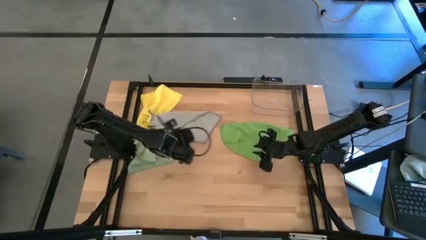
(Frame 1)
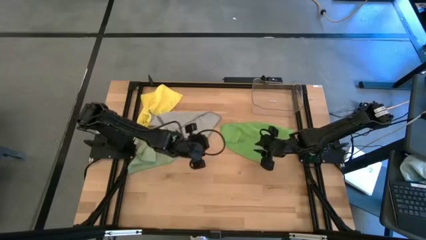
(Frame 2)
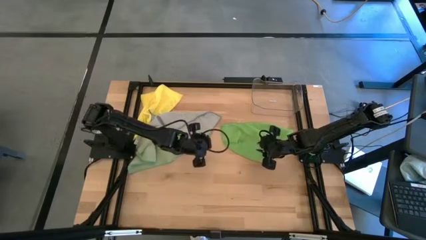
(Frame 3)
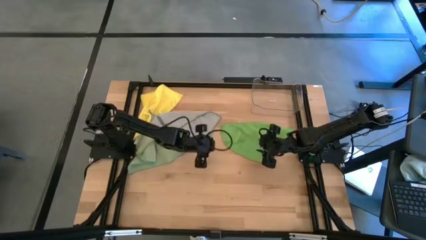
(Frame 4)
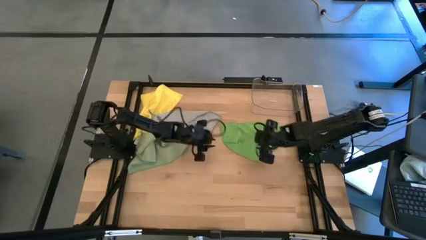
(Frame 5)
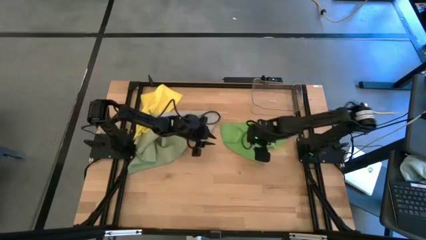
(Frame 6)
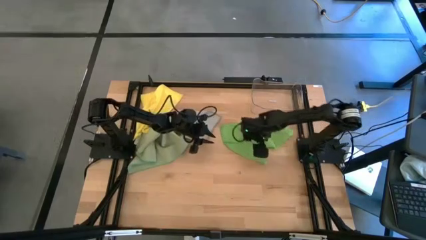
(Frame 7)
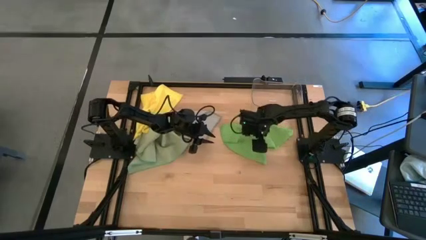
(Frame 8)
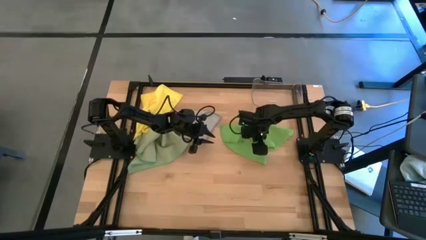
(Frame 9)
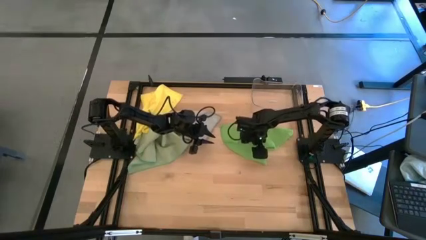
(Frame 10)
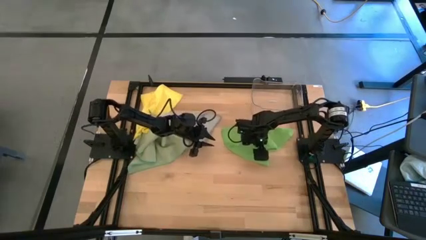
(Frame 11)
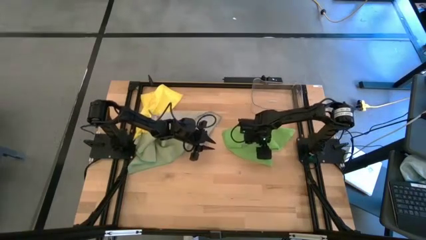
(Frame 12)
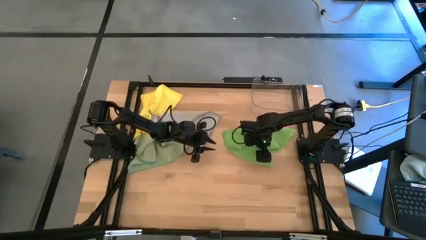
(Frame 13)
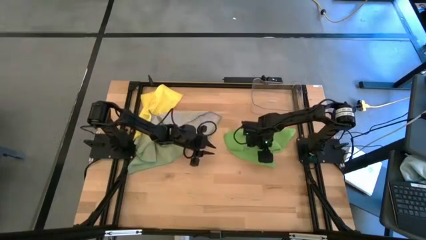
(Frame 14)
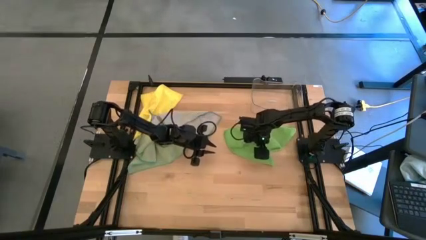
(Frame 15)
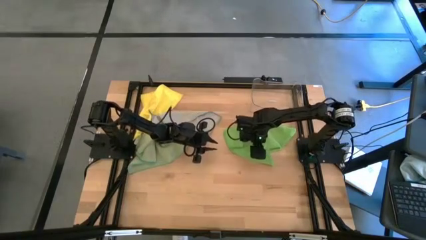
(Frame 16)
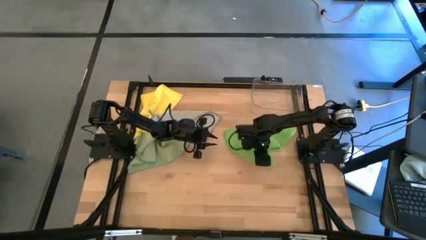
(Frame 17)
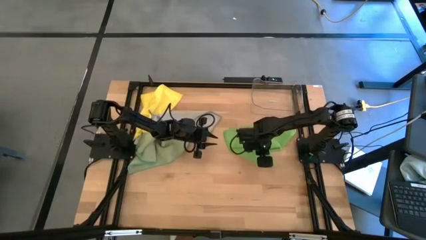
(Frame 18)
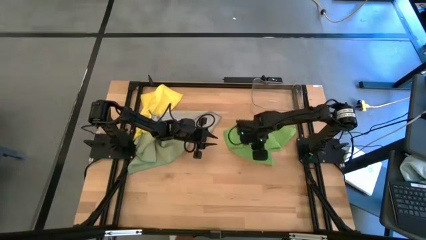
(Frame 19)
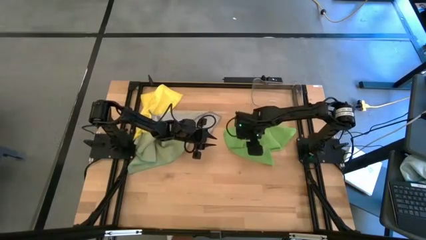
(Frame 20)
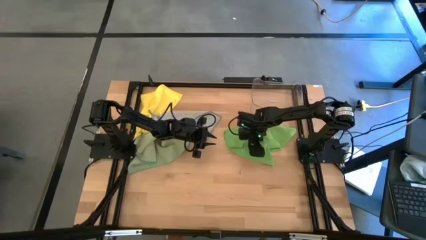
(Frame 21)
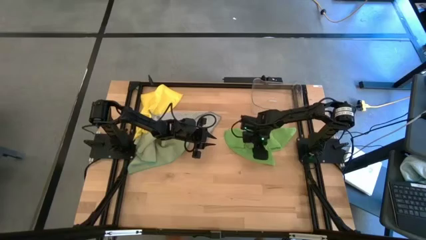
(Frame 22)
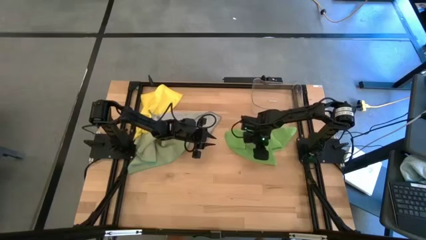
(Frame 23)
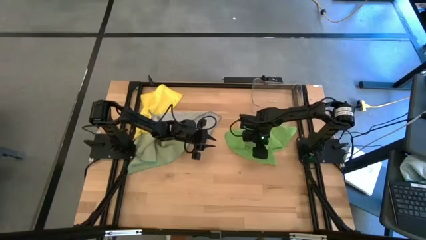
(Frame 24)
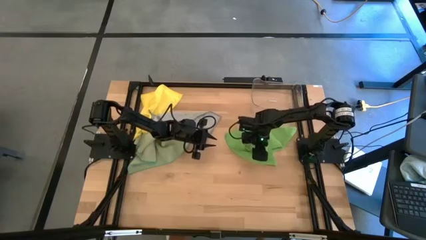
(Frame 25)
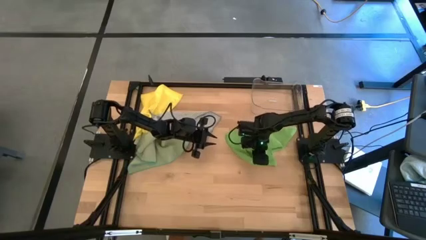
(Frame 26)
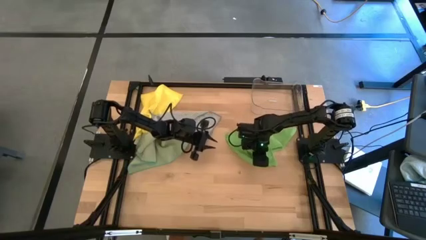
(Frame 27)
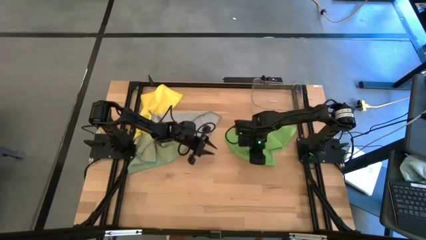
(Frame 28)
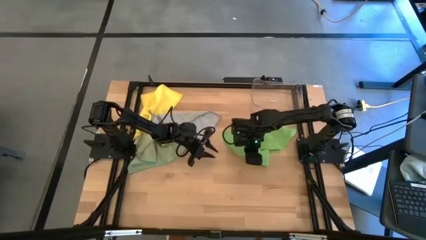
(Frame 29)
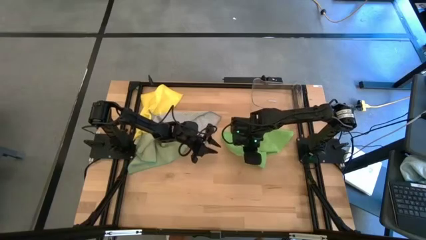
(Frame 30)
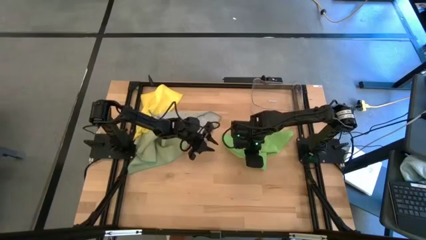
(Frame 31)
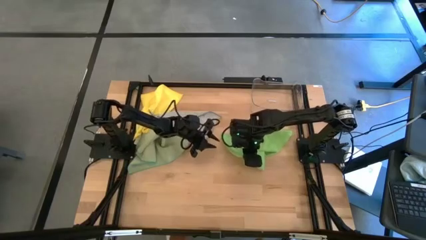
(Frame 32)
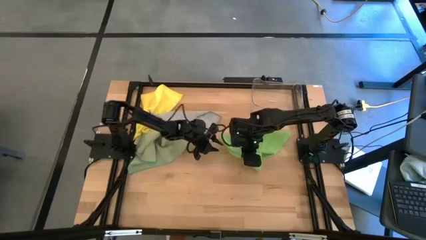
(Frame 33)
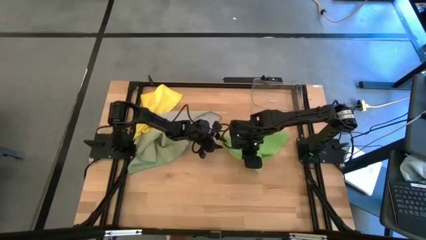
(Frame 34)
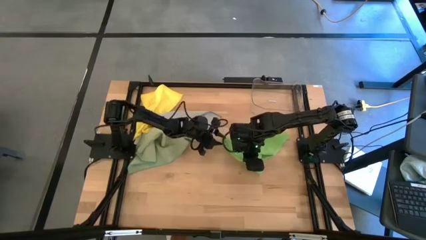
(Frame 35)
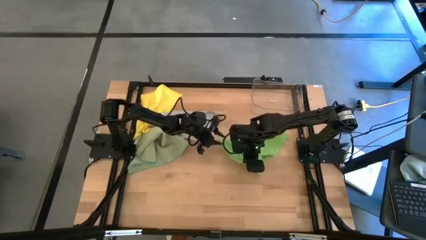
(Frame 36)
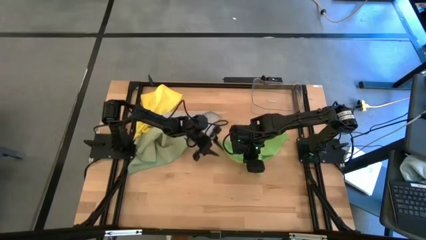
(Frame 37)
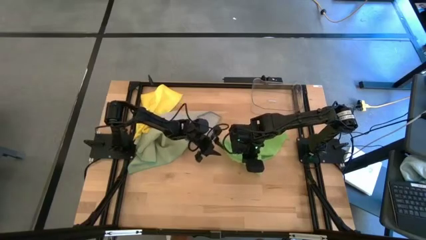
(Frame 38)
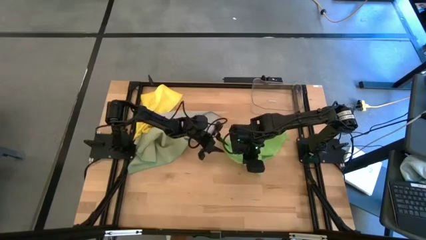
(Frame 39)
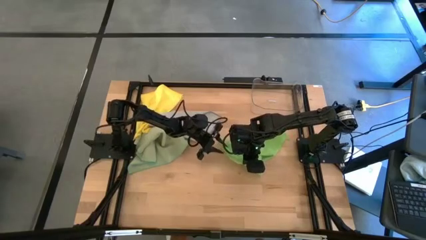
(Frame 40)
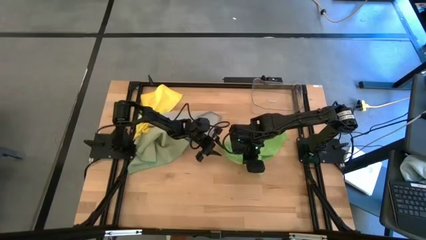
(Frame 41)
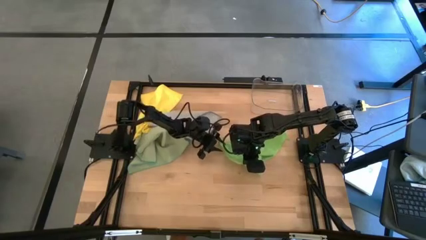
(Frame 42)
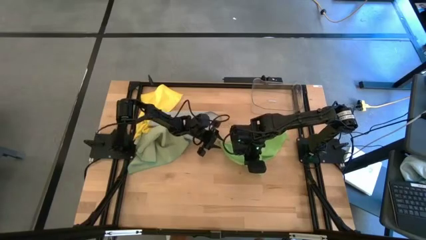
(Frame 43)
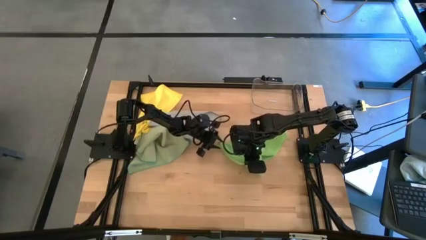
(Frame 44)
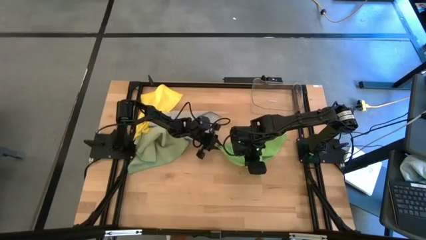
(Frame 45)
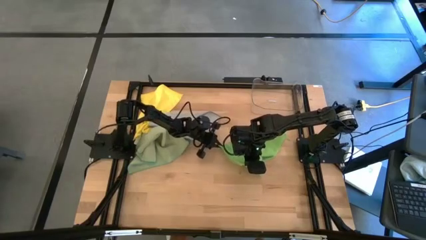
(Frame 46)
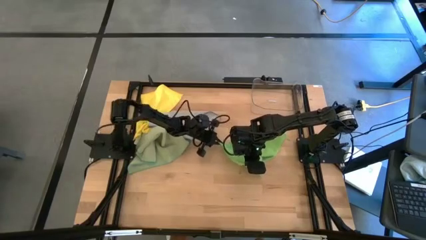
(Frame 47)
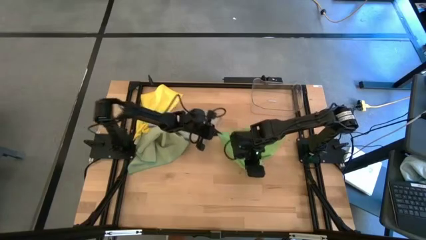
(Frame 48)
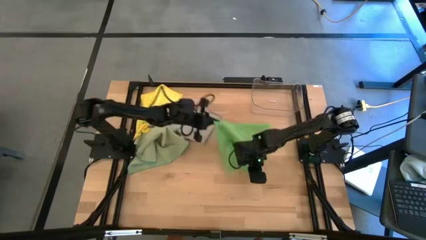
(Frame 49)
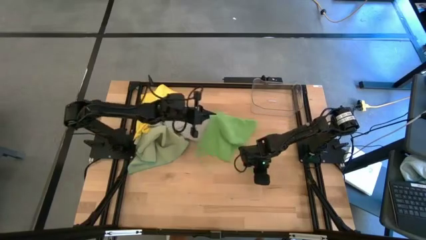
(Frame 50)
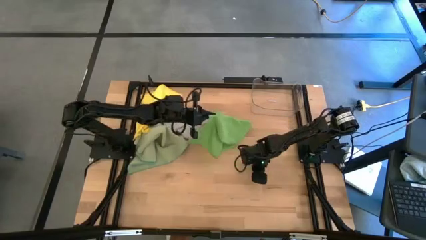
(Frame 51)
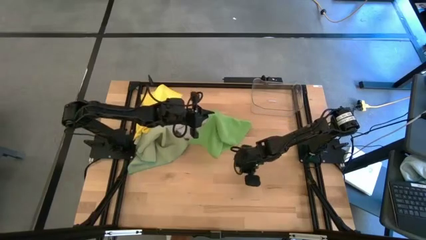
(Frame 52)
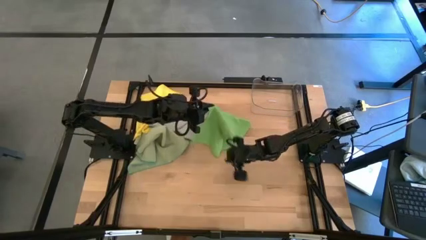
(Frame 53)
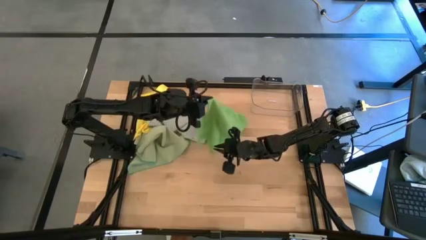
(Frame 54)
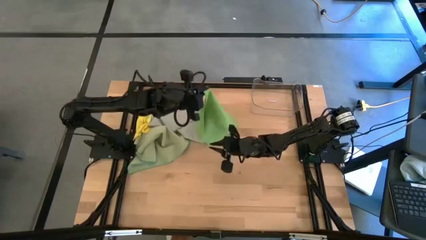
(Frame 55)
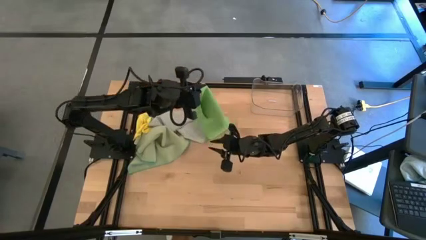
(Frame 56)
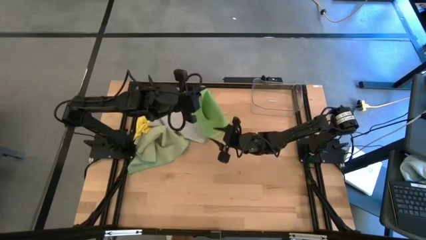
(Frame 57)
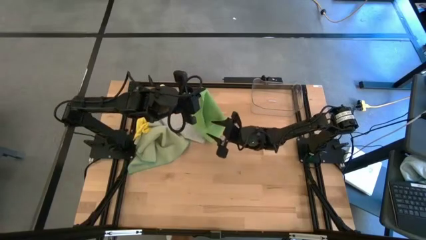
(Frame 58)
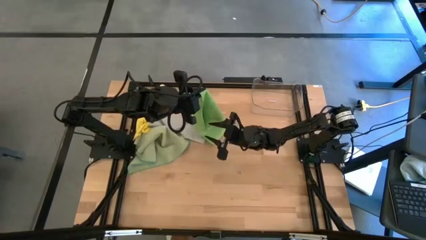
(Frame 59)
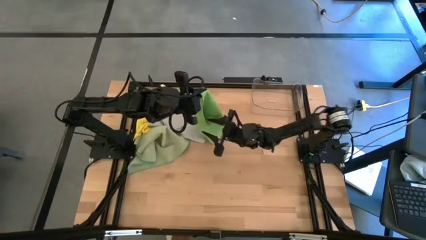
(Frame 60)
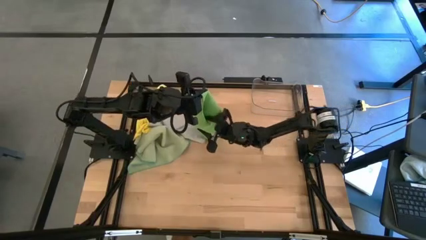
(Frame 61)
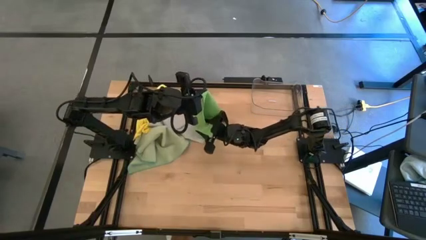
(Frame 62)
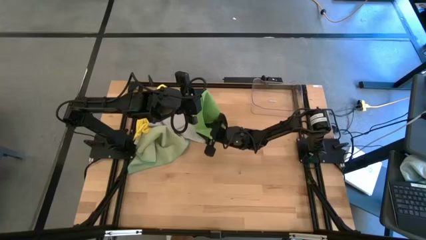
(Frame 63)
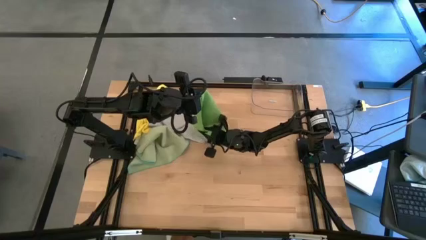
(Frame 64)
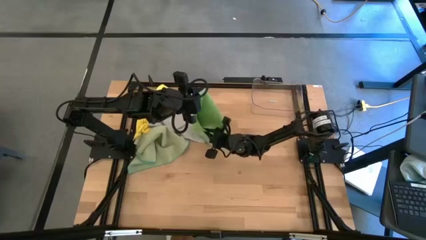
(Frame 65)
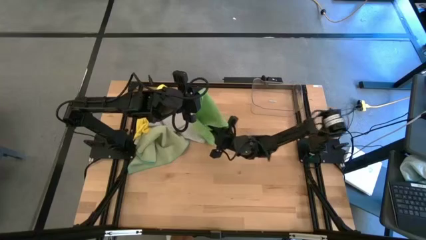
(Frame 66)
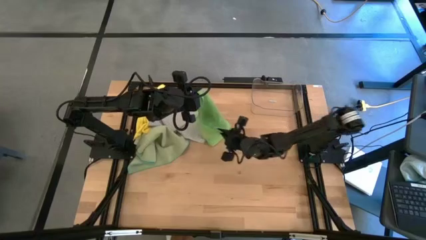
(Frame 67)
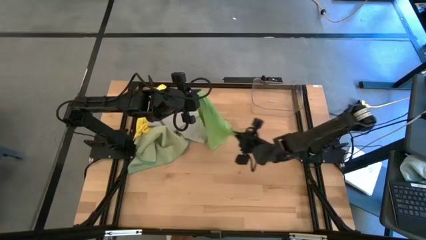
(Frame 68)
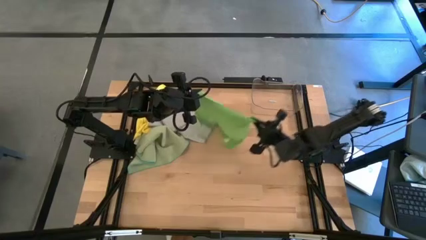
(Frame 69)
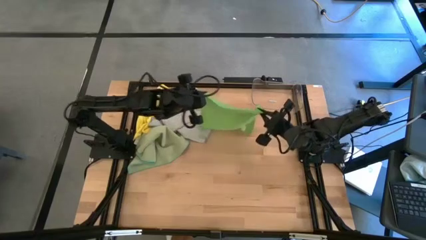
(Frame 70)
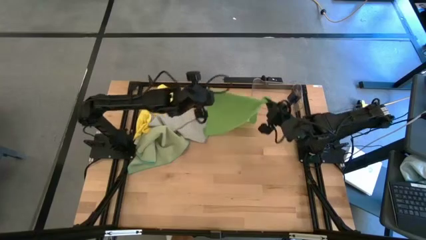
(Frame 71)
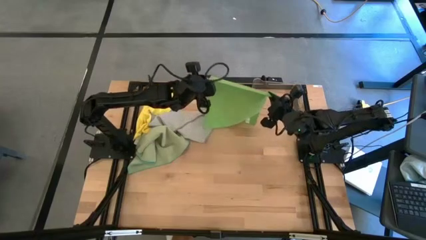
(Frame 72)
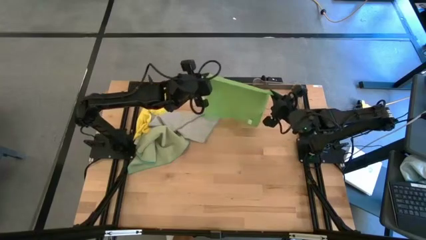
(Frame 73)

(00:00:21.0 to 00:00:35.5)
Task: Fold microfiber towels
Fold the green cloth

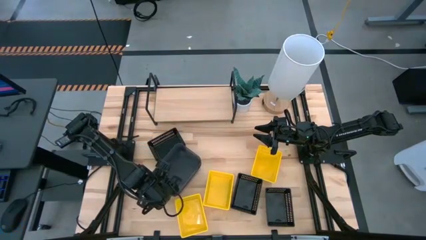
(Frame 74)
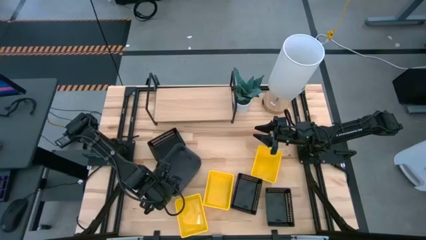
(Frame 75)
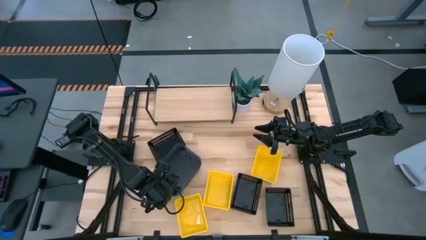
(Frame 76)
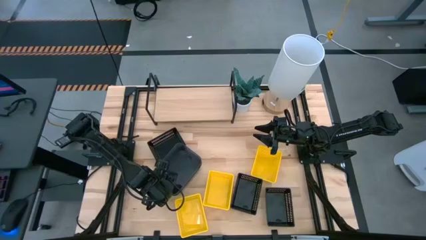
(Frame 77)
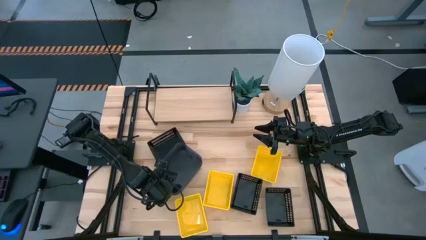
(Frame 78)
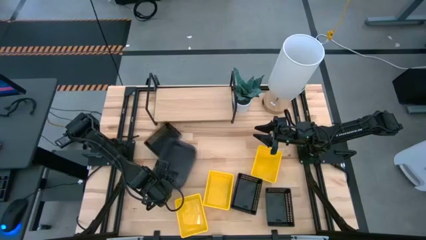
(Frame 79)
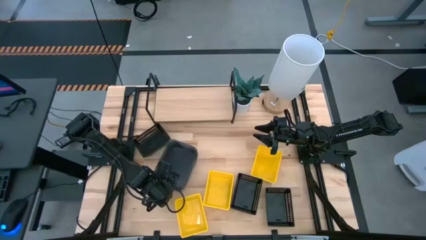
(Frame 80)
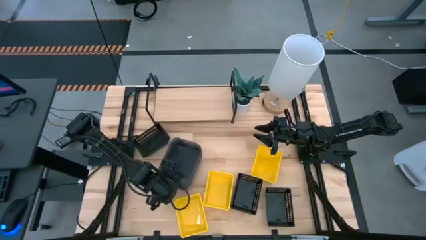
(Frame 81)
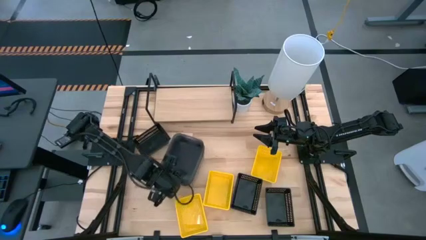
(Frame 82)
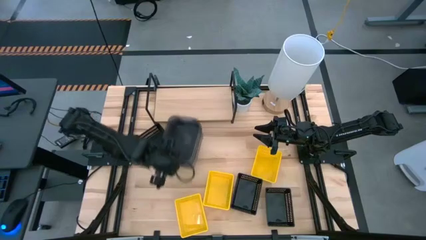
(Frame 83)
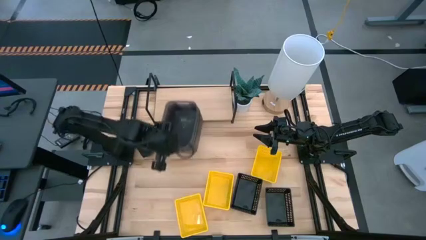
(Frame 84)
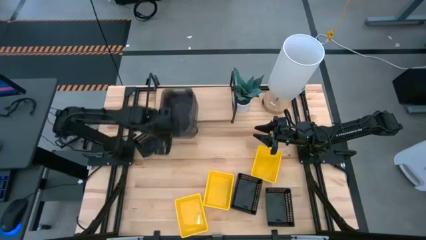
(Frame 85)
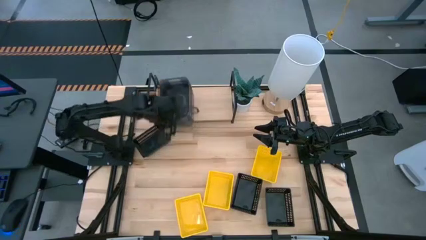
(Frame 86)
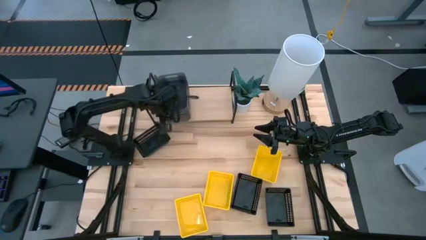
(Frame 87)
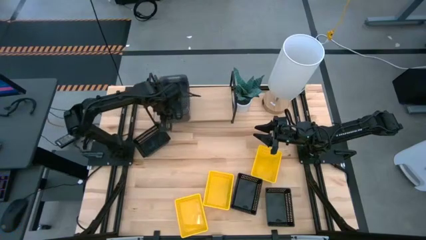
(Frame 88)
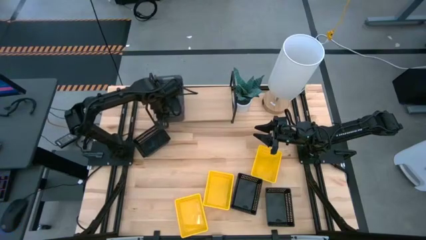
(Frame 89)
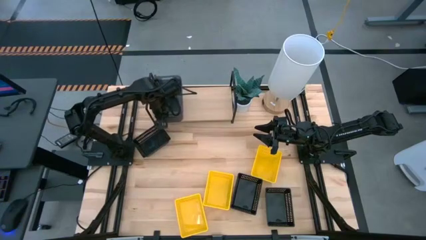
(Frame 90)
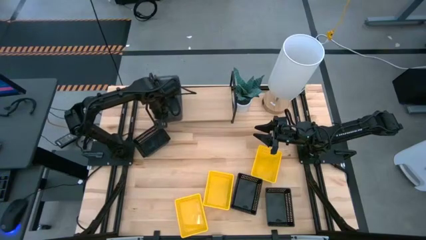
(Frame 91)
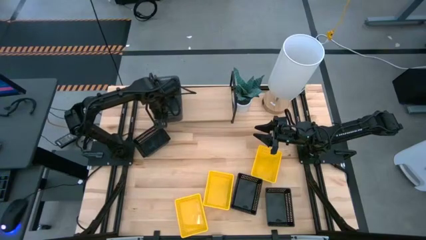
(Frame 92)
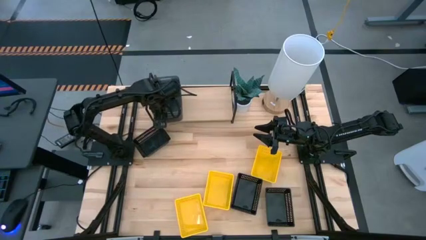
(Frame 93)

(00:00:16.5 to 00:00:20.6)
Task: Stack baskets on shelf by color
Put the stacked transparent black bins on the shelf
